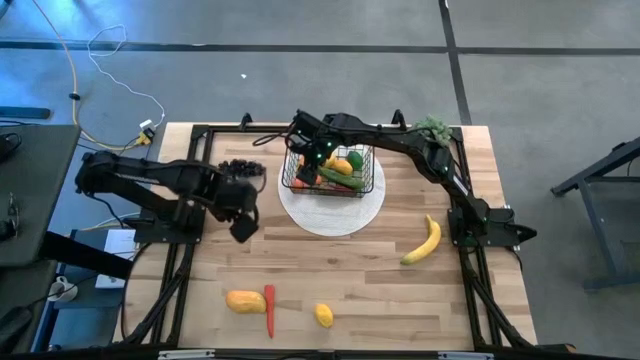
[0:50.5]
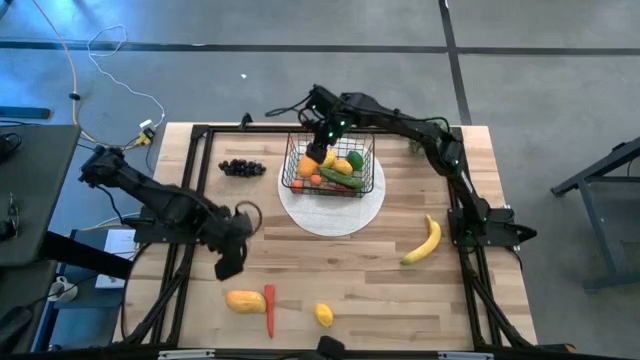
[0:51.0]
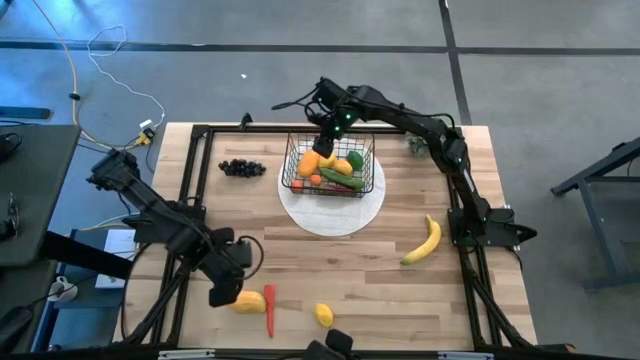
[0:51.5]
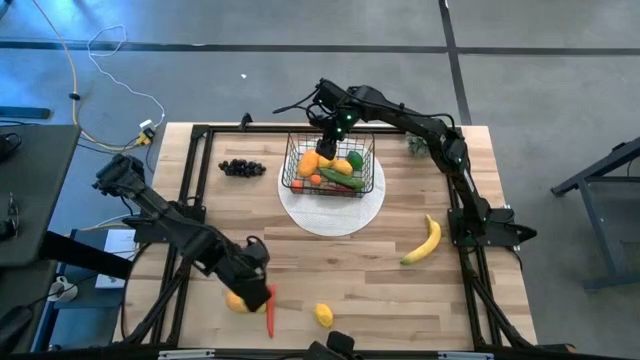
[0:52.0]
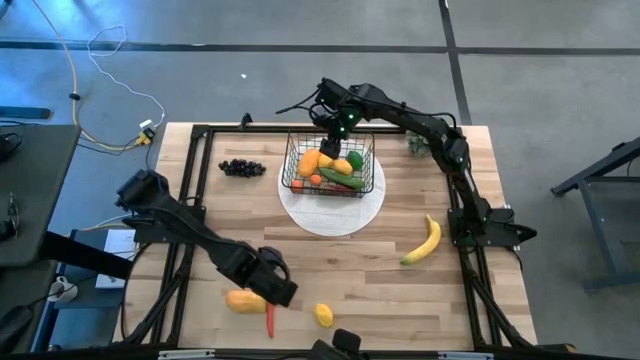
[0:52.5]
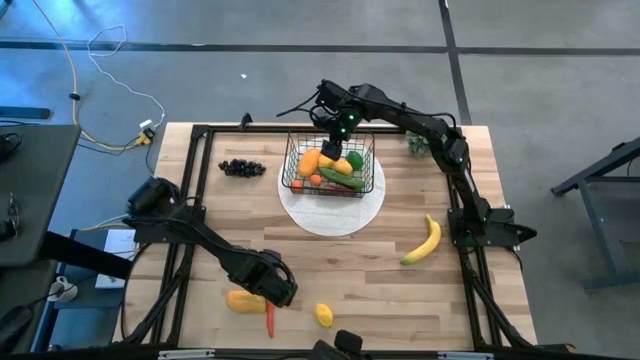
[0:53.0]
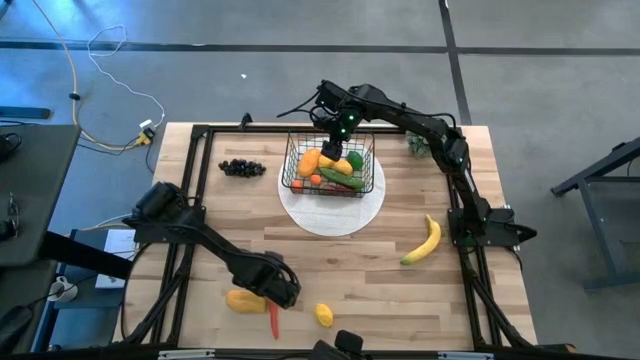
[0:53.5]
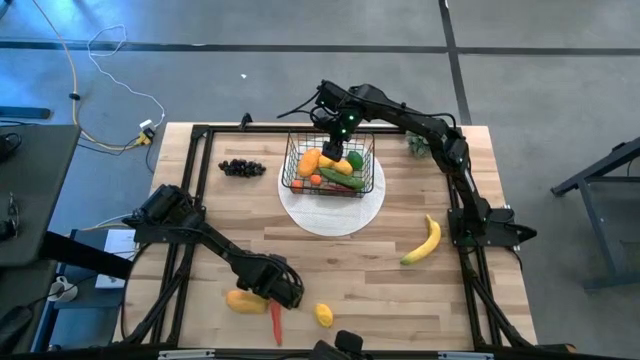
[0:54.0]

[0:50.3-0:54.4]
Task: Build produce basket
Put the orange carrot into the wire basket

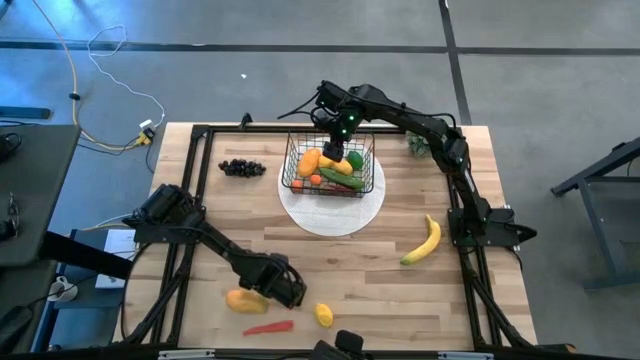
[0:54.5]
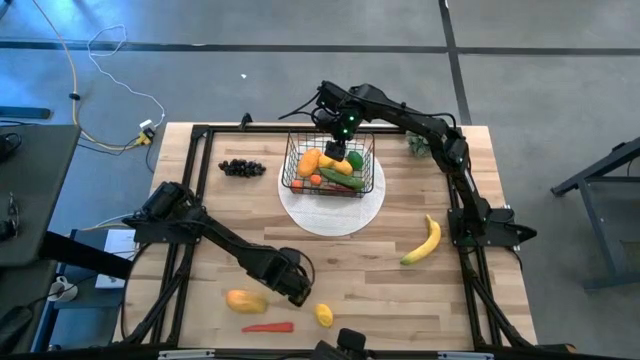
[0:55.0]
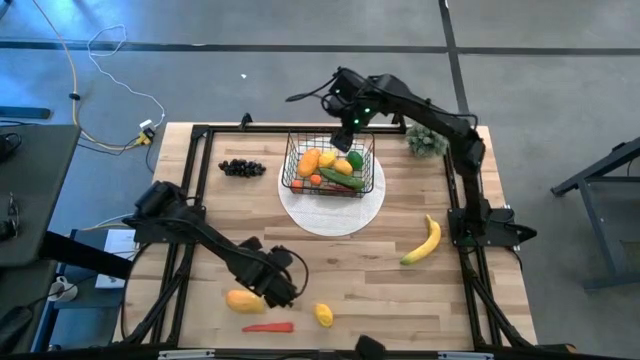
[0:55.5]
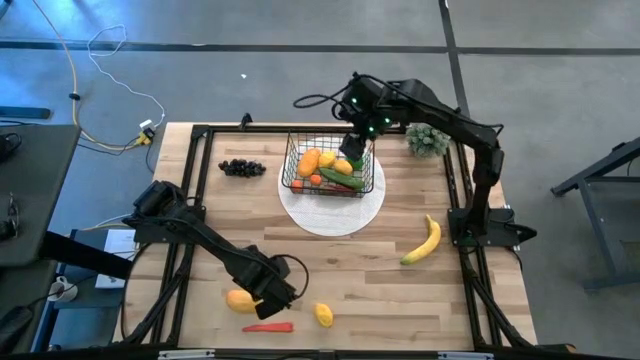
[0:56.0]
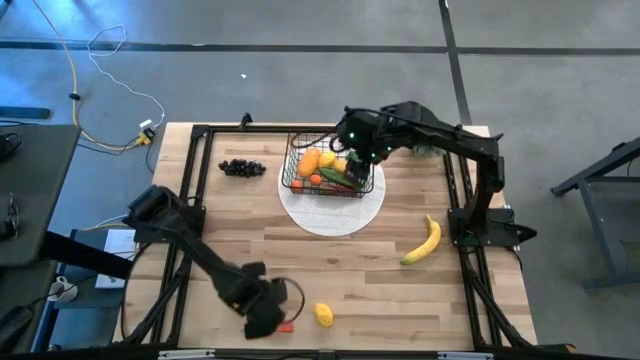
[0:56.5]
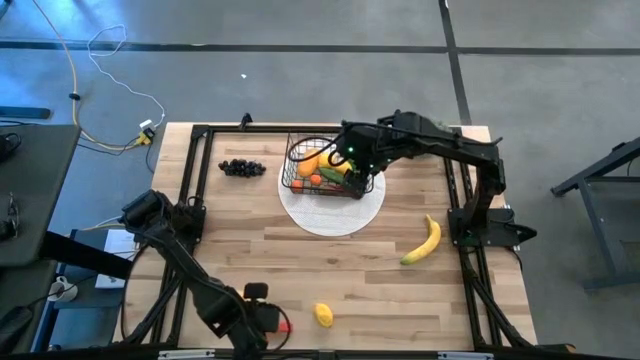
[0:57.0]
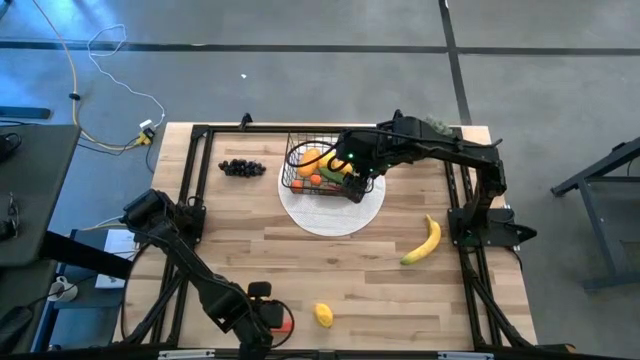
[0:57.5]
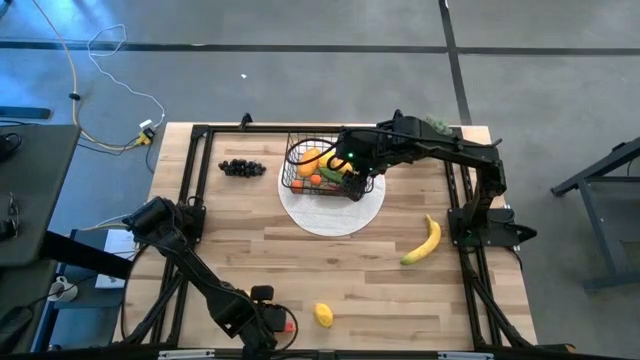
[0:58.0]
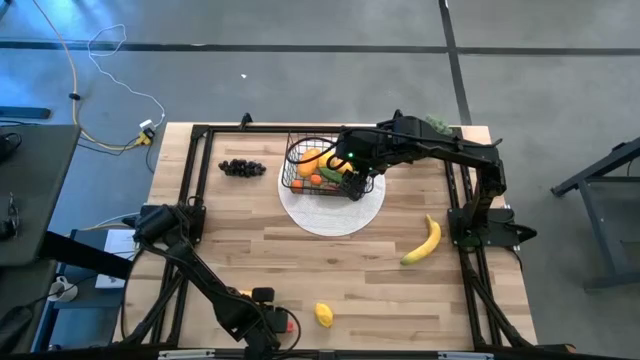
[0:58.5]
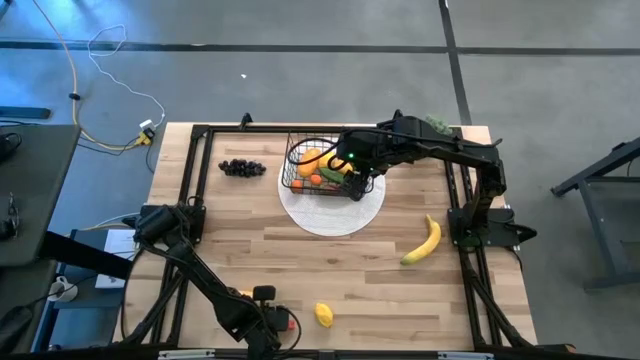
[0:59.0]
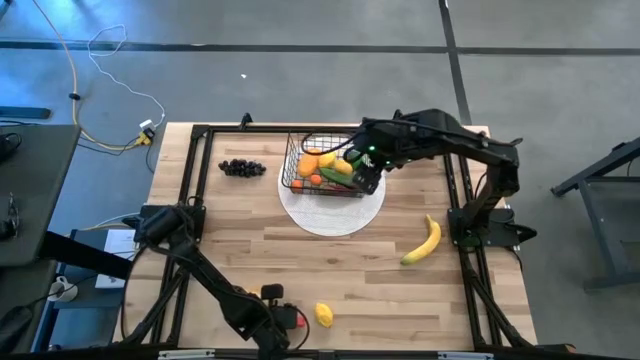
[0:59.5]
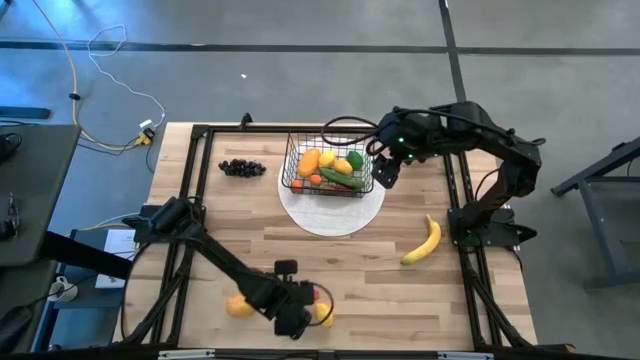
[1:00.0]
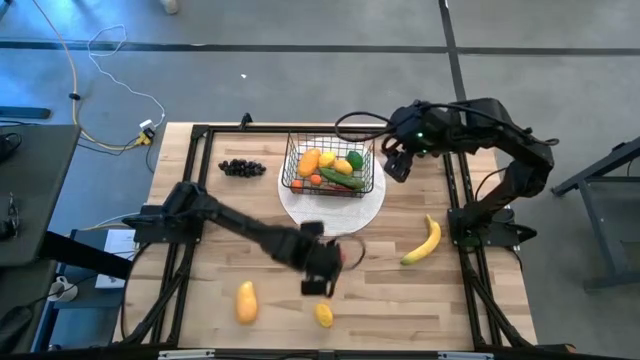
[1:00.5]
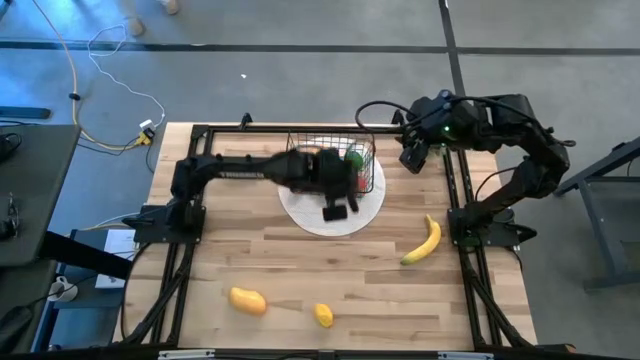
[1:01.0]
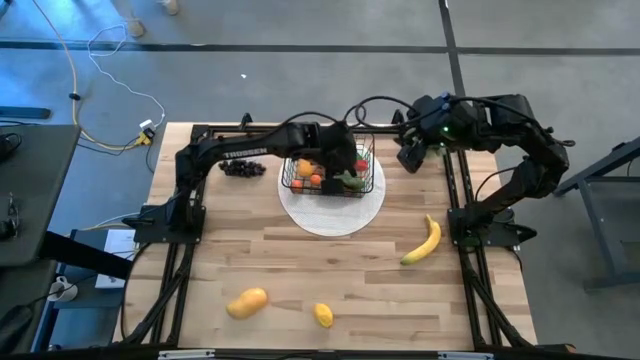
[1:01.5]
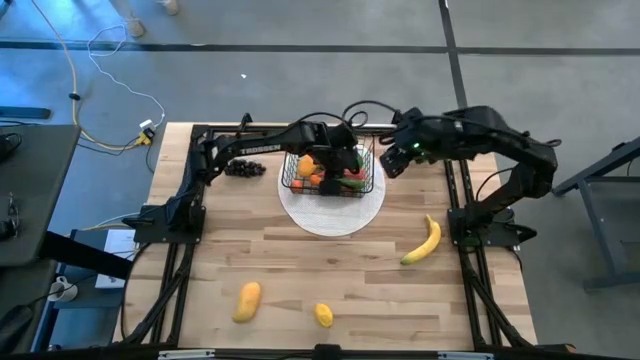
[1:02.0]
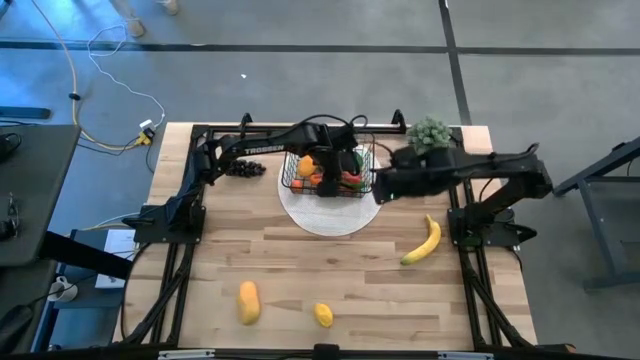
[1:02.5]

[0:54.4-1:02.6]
Put the orange carrot into the wire basket

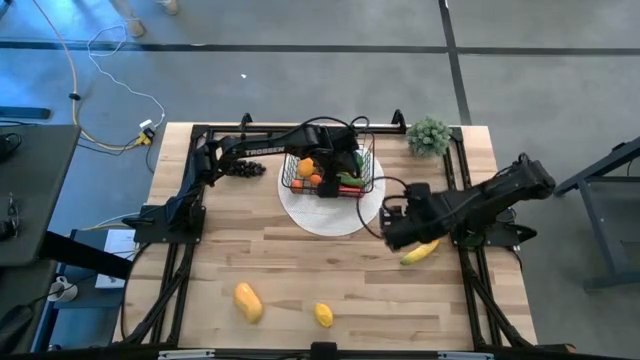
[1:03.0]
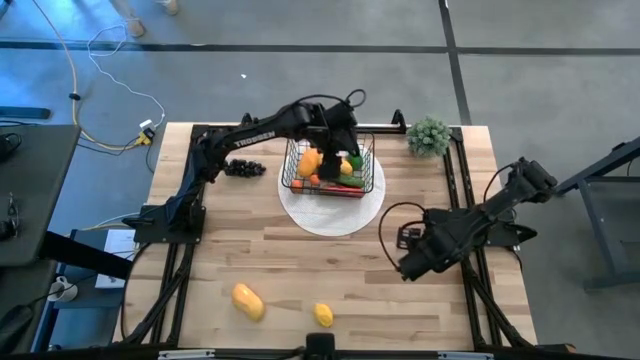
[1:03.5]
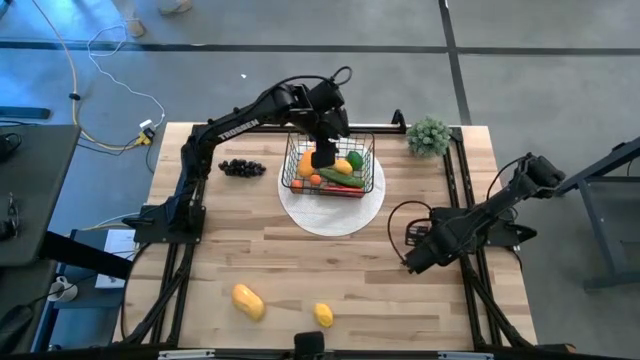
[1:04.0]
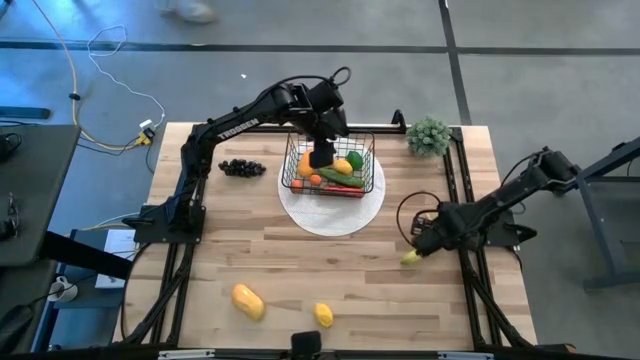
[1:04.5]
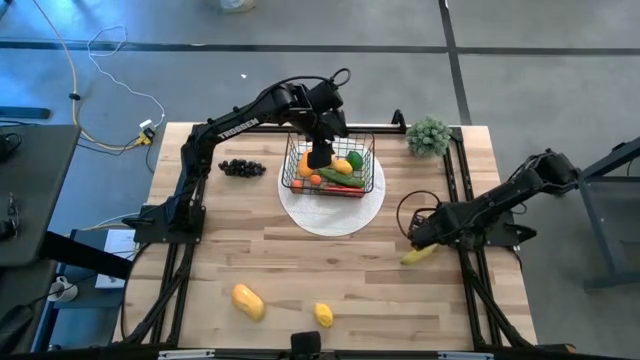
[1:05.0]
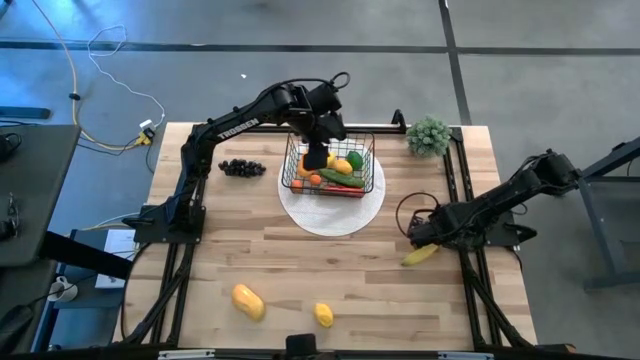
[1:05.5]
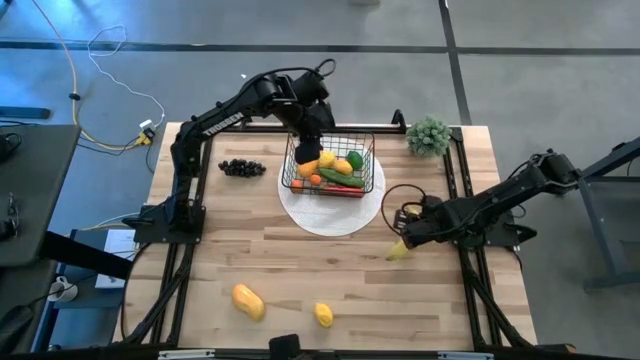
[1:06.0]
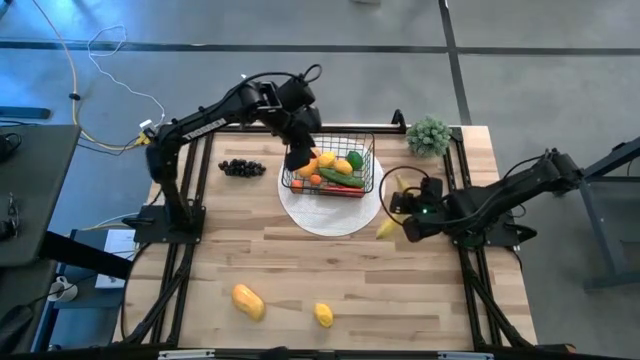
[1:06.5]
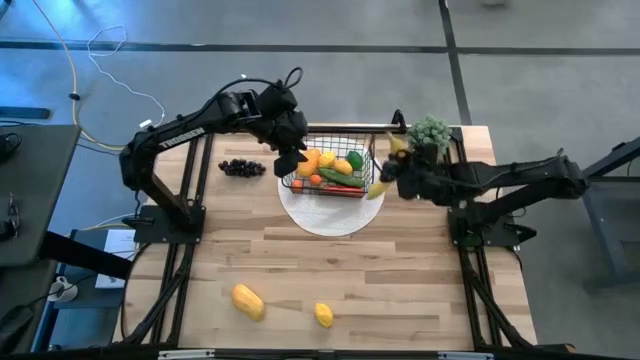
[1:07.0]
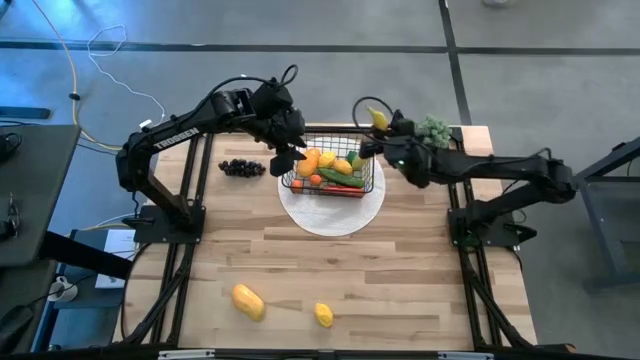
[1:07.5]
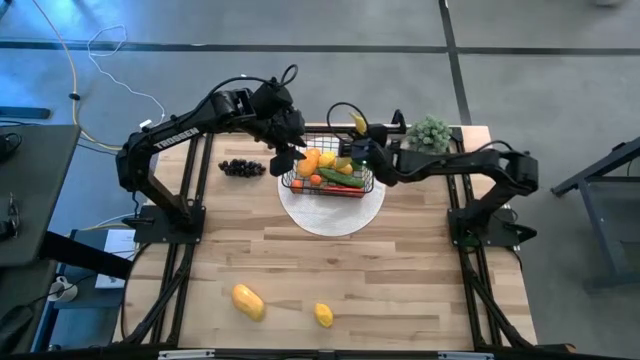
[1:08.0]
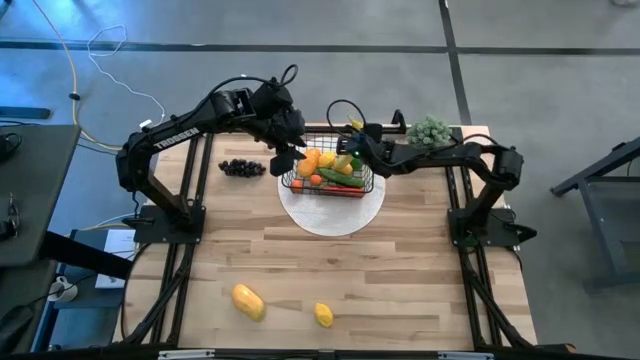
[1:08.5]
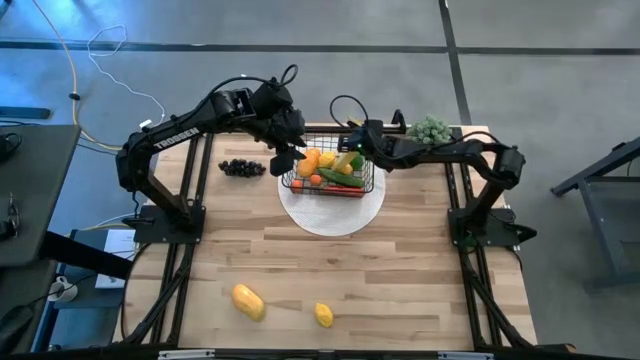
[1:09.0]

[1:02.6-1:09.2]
Put the yellow banana into the wire basket

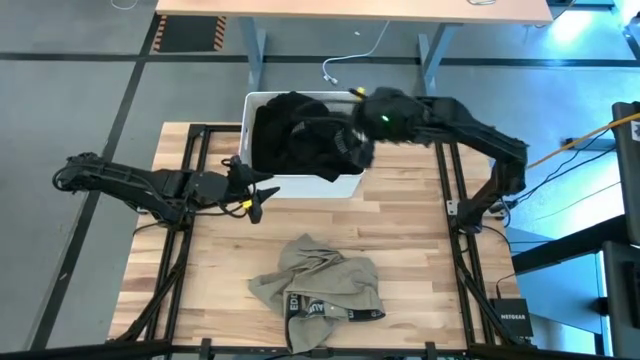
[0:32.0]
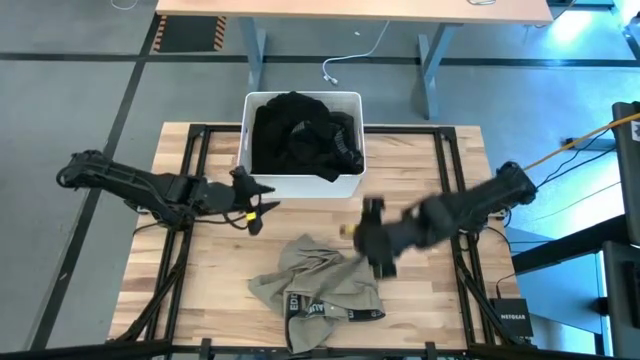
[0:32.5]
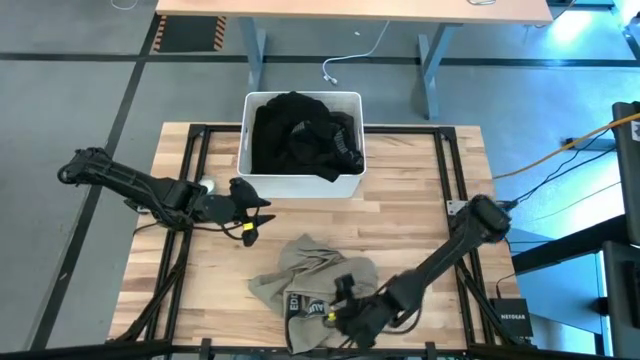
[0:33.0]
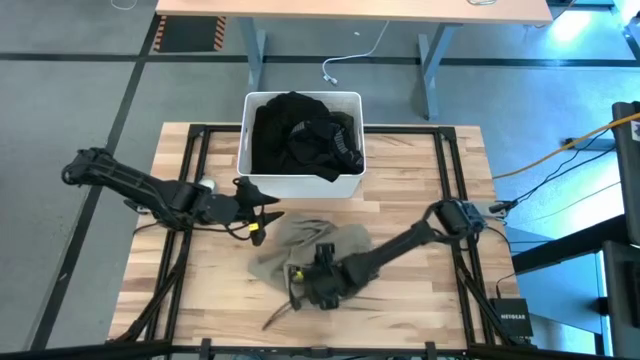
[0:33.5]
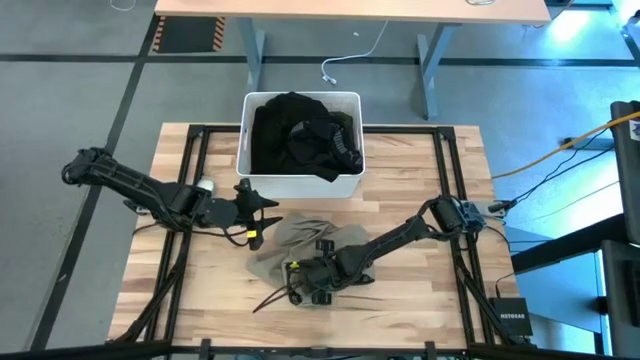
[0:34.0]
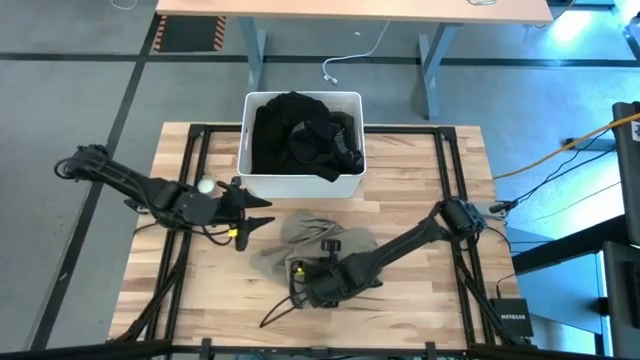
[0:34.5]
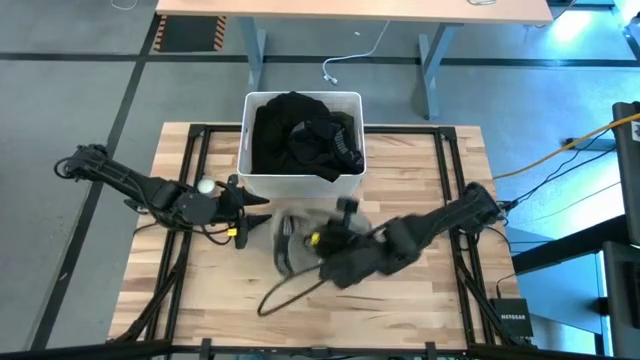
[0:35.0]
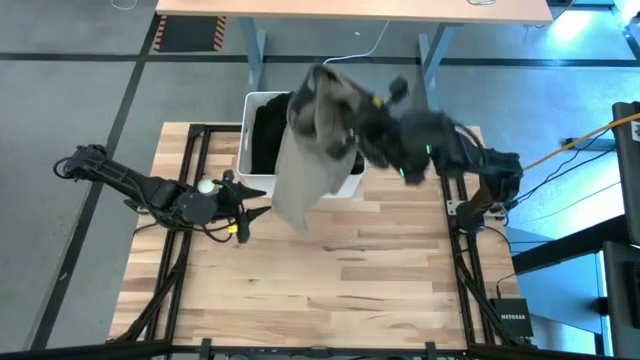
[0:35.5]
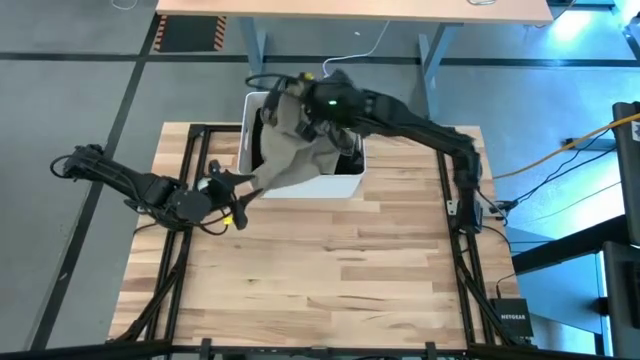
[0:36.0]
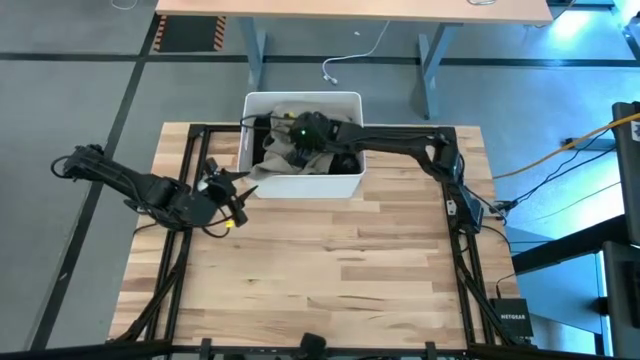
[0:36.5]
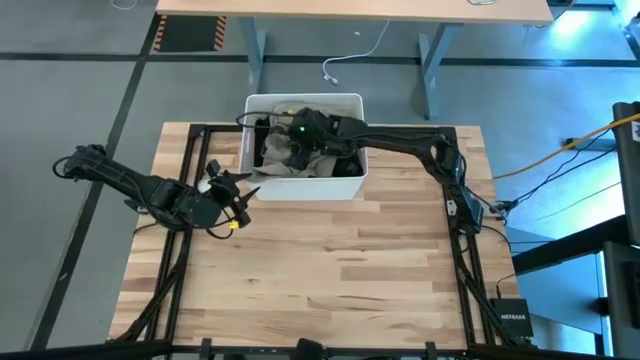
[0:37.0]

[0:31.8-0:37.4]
Task: Sort clothes
Put the light brown shorts into the white bin
